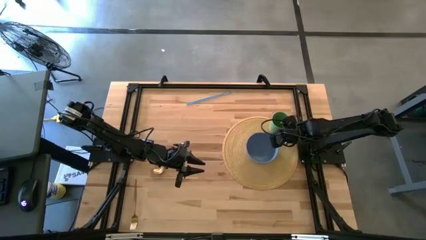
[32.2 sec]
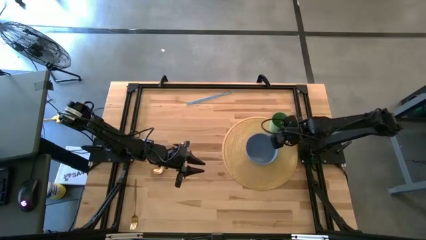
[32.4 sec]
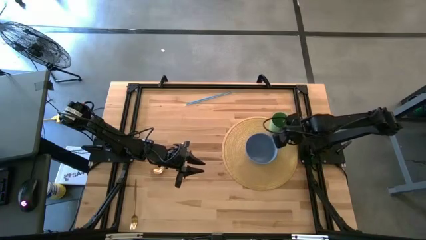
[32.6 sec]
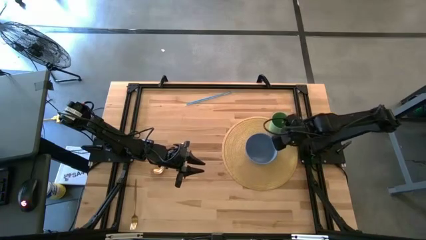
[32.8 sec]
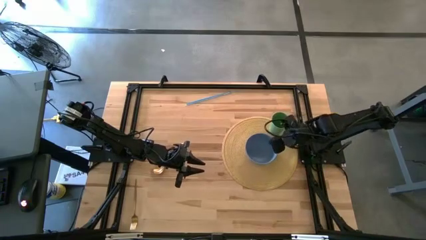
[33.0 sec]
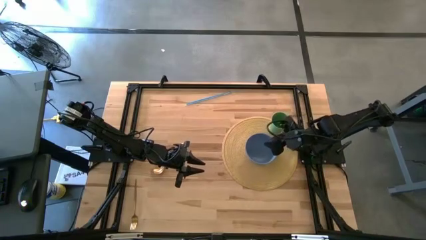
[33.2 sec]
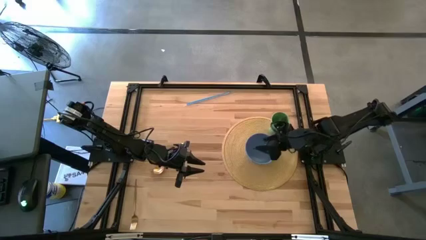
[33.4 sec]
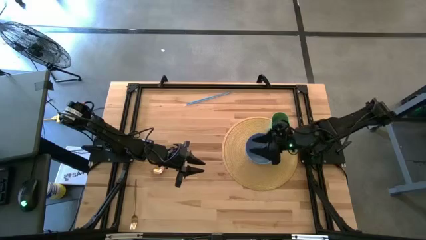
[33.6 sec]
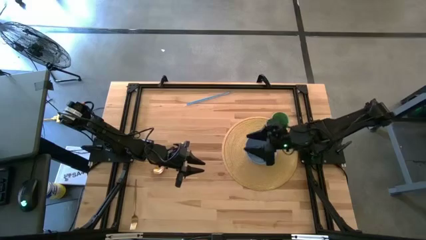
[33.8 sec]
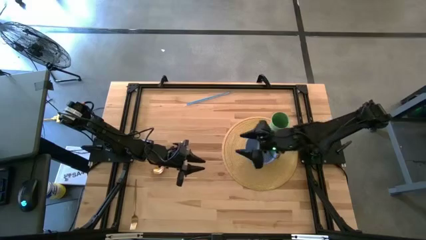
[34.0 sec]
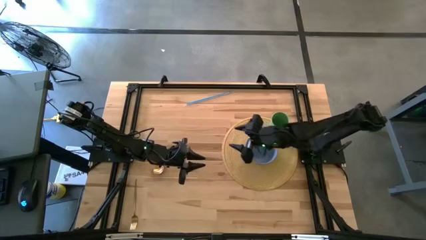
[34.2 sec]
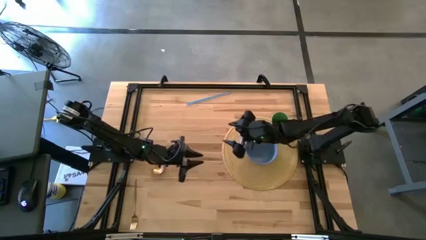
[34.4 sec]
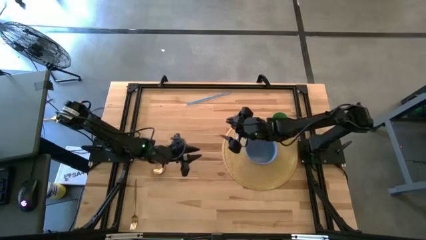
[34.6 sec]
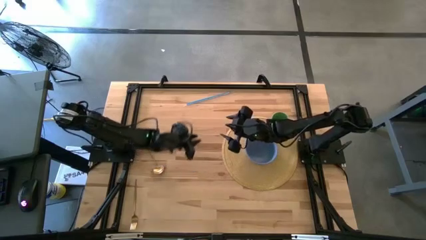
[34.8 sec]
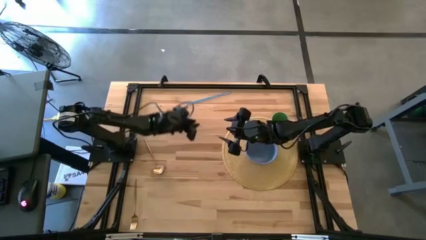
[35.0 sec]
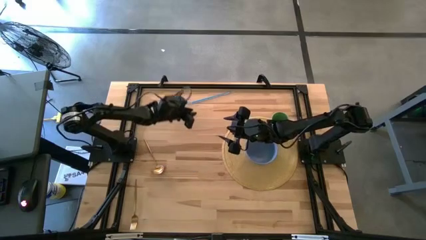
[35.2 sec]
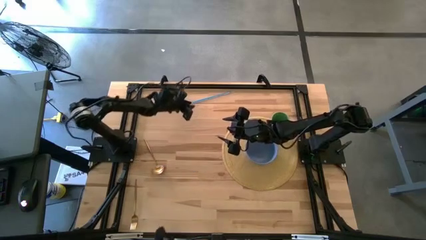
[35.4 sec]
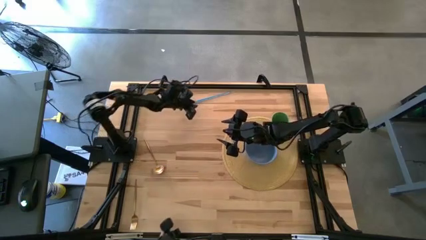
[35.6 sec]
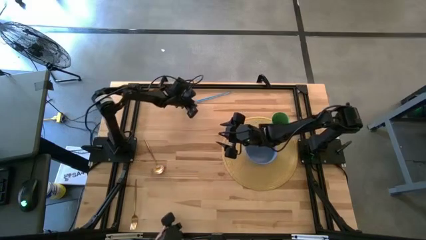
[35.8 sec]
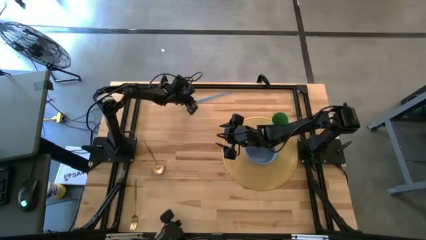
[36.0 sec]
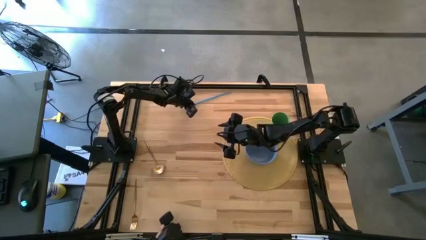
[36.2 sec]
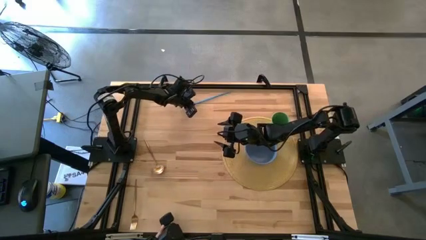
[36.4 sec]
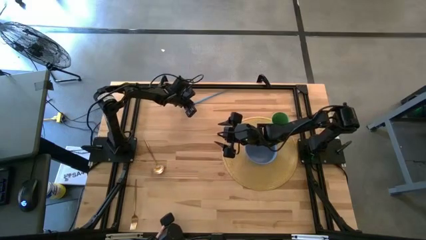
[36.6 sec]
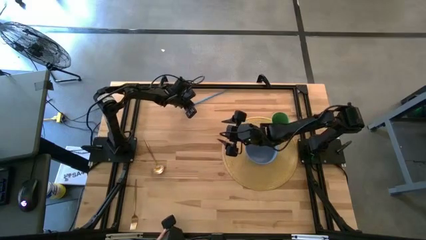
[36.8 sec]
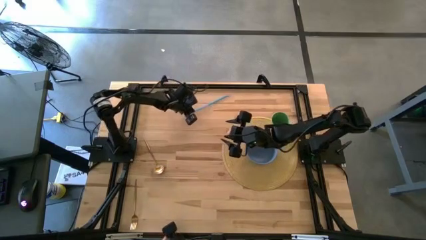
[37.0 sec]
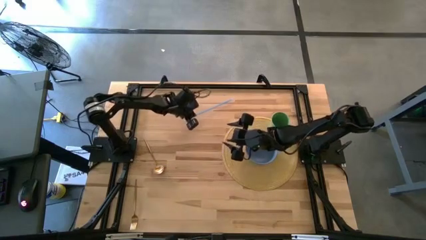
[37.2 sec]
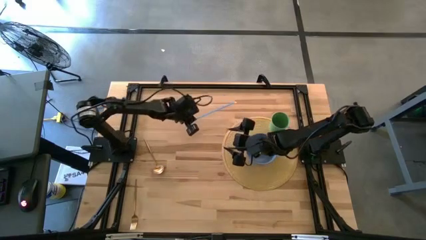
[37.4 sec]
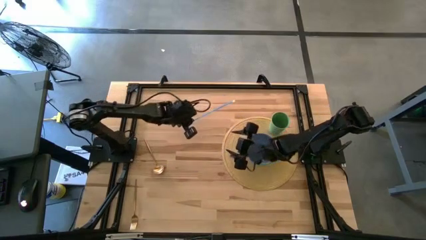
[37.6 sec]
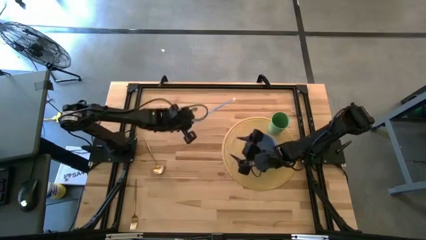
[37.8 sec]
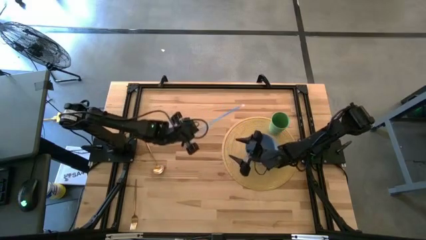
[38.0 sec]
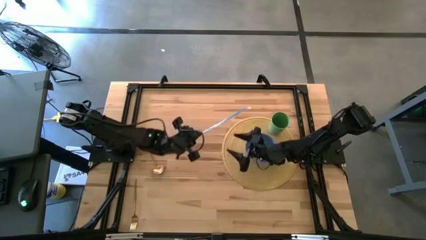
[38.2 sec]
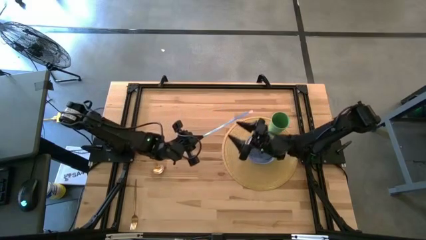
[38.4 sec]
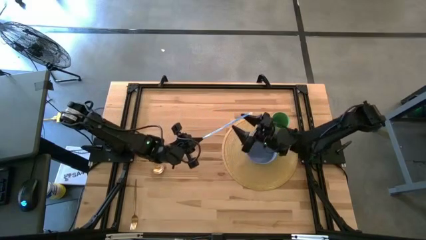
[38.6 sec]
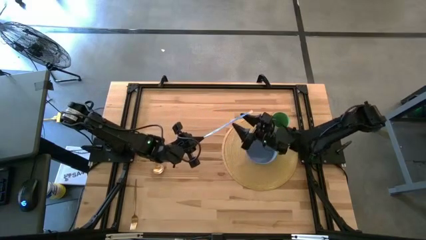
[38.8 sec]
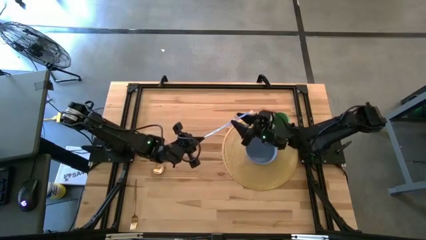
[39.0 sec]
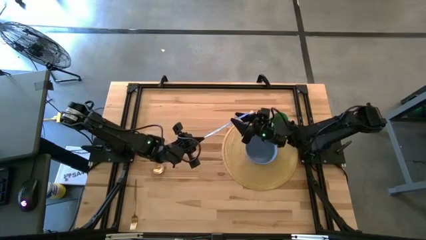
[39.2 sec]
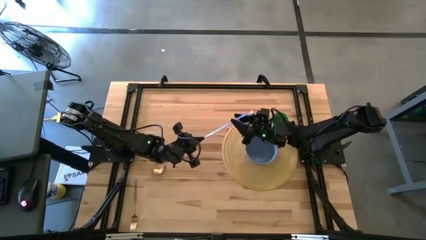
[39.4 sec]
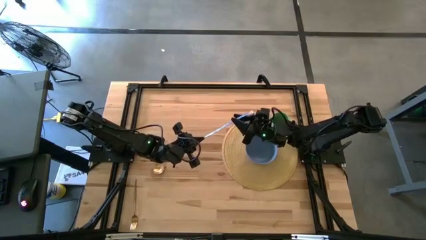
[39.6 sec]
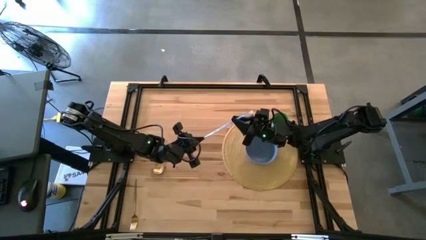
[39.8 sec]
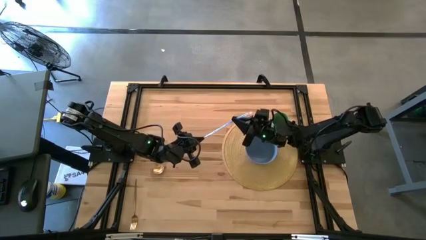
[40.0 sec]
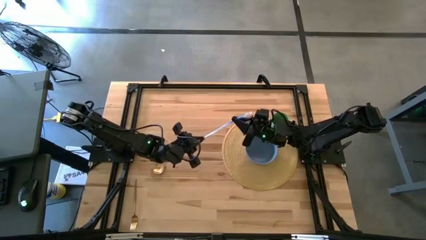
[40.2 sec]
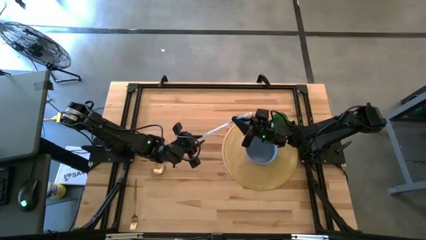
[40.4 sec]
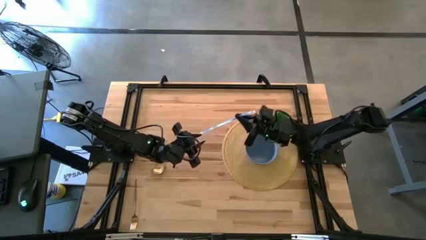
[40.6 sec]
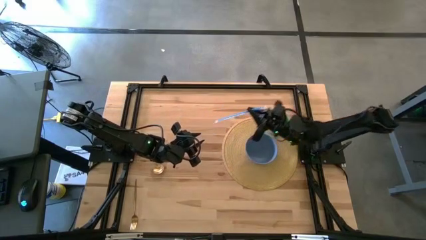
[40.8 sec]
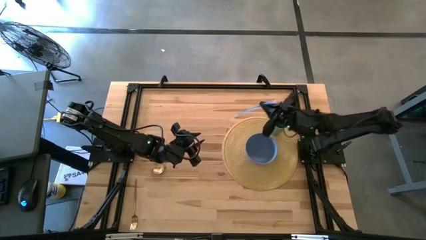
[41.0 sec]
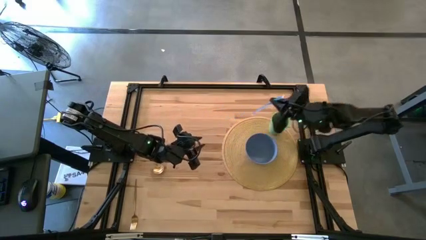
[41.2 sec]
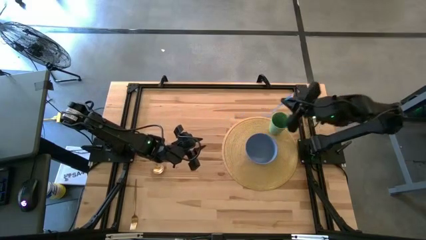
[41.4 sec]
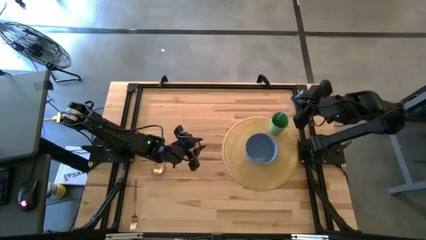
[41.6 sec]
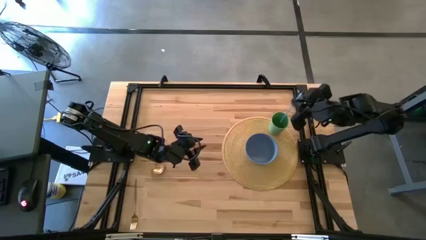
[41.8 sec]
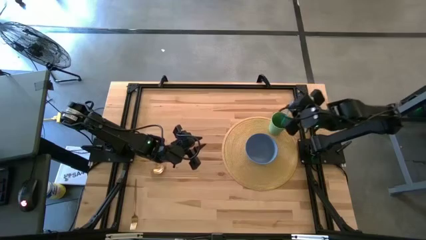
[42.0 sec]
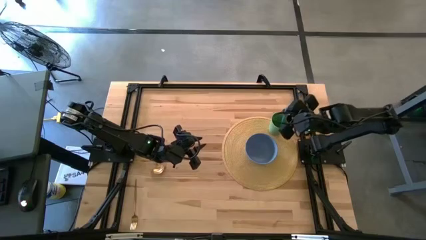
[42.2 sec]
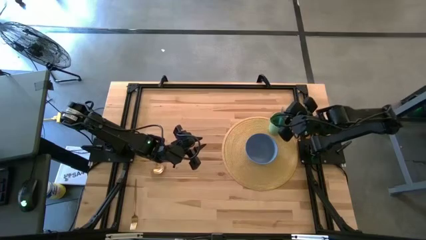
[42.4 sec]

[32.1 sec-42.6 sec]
Task: Pick & Place Utensil
Put the blue straw into the green cup

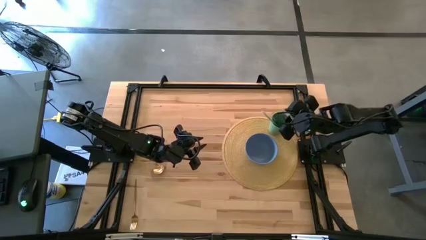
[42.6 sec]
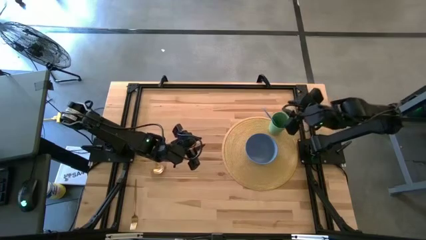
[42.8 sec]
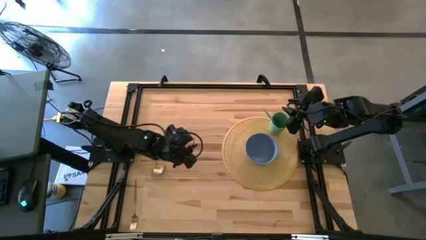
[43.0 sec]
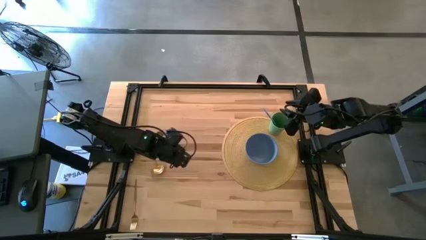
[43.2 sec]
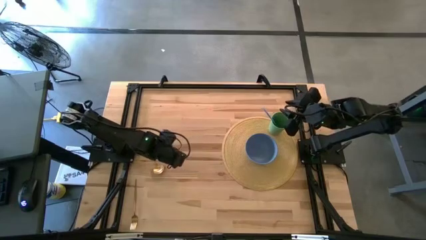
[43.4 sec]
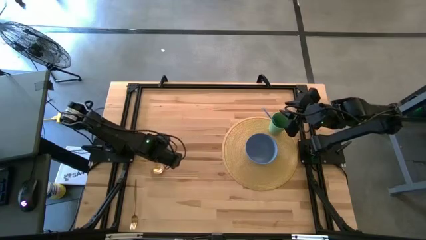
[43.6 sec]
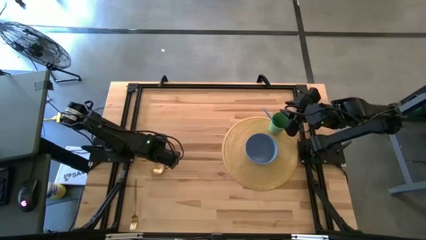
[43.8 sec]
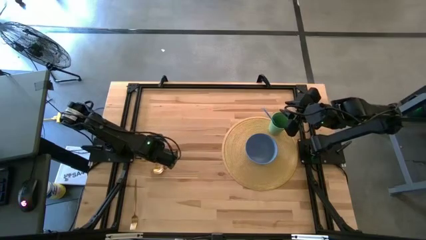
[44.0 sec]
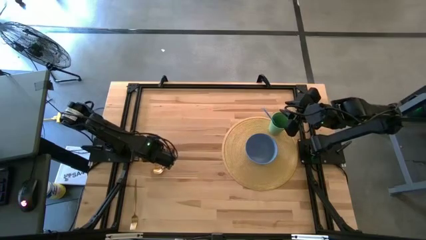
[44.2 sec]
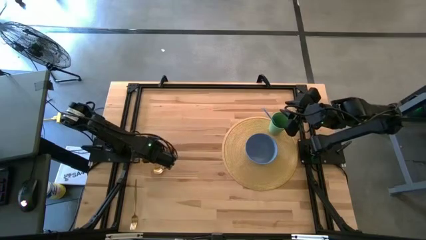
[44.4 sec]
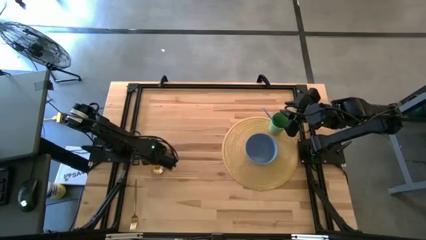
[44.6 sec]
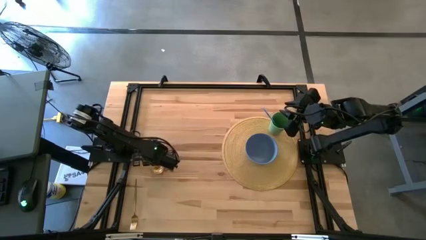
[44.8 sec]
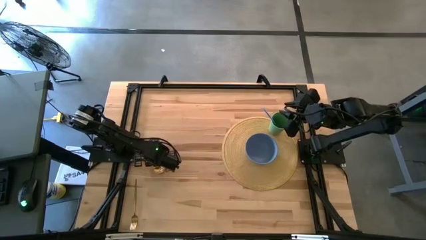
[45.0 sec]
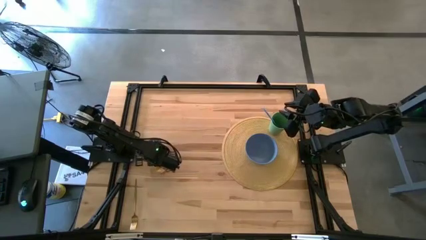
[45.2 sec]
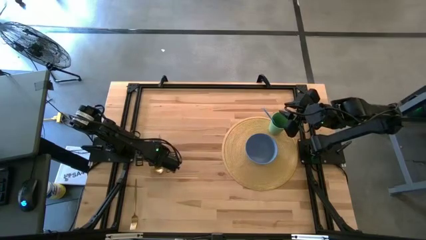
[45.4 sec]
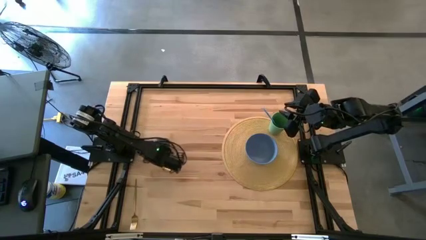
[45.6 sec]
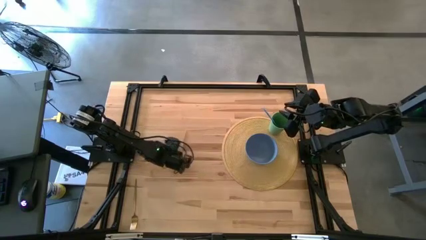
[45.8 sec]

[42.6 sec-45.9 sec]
Put the gold spoon into the violet bowl

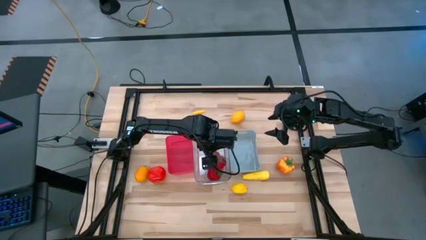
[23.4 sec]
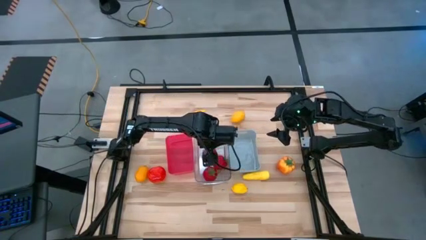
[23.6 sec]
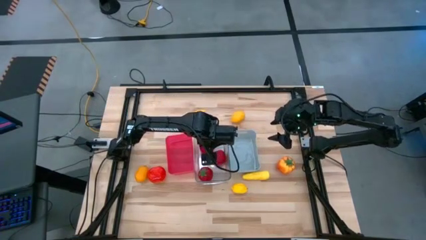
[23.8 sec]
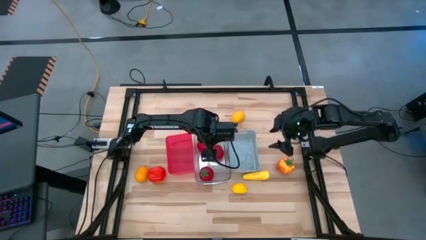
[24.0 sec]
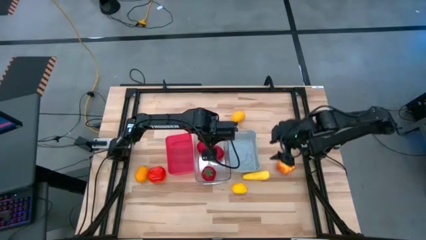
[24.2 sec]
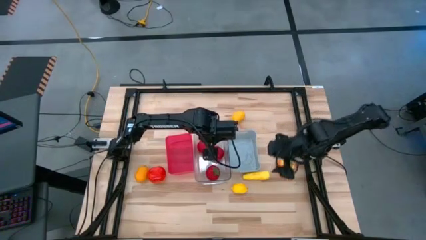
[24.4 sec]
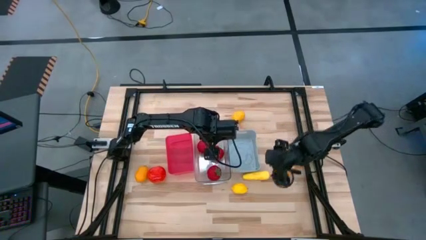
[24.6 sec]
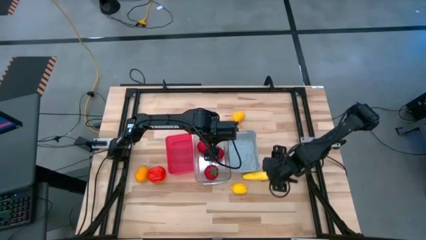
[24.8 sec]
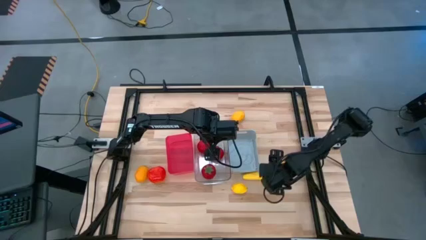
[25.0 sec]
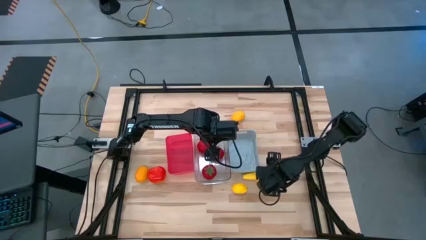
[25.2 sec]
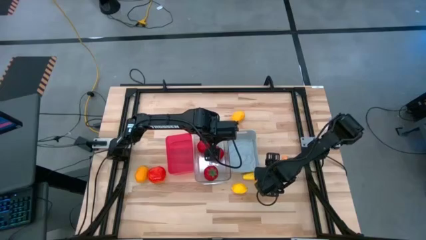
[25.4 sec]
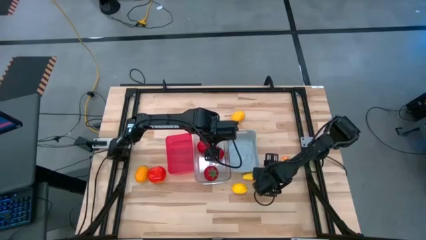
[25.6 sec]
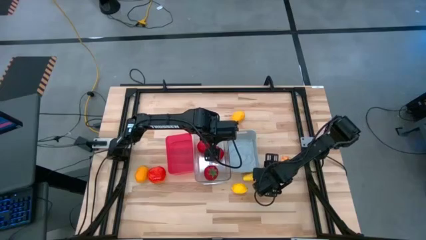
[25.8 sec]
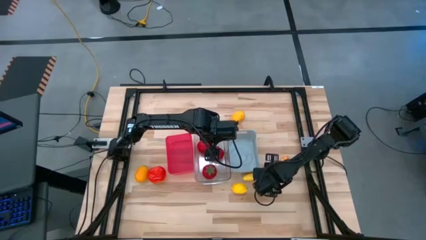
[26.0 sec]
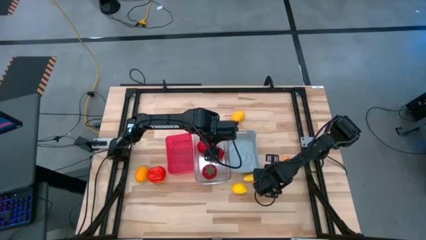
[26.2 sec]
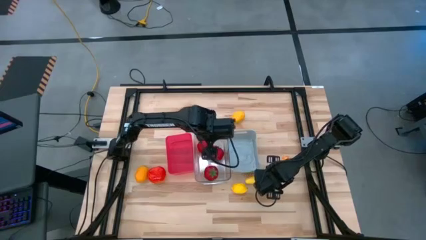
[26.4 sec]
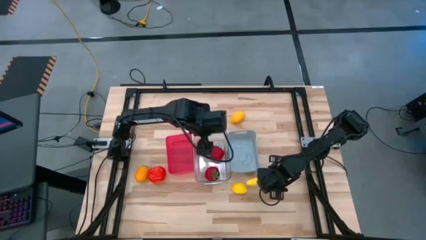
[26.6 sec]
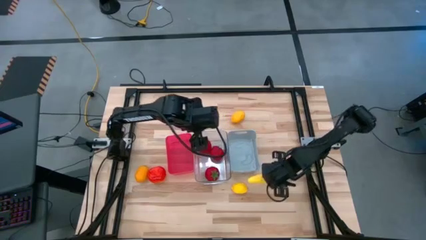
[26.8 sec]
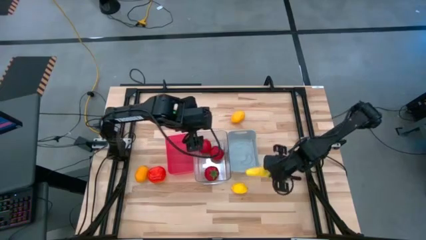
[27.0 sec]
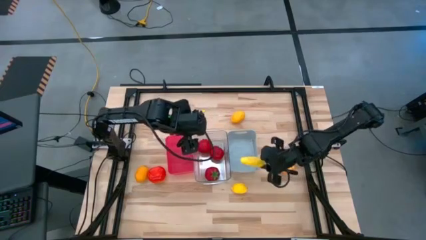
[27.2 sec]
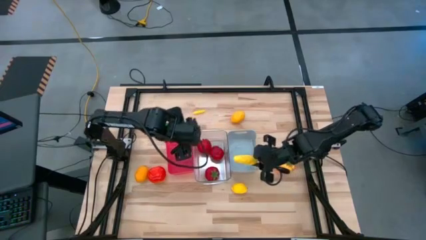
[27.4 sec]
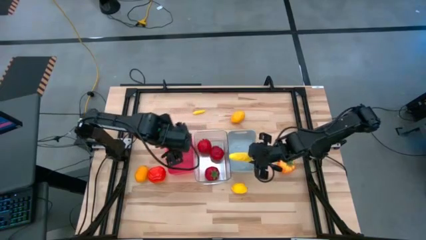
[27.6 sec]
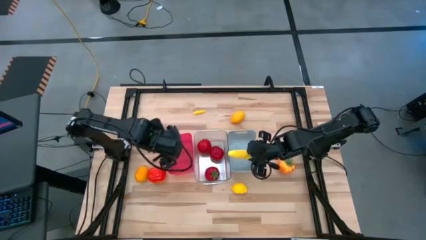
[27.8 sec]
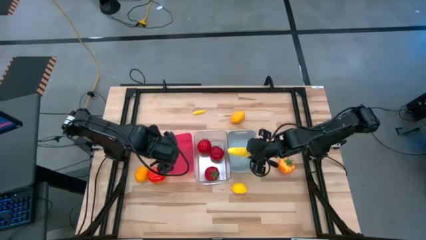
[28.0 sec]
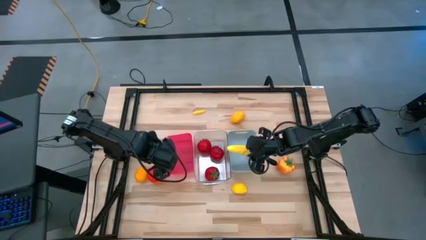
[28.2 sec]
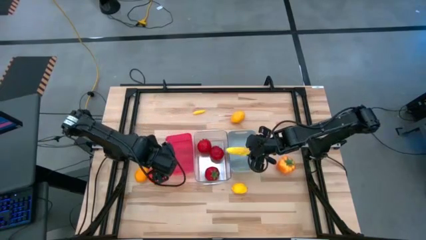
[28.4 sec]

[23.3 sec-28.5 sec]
Task: Sort produce into baskets
Put the bottom yellow corn into the gray bin
